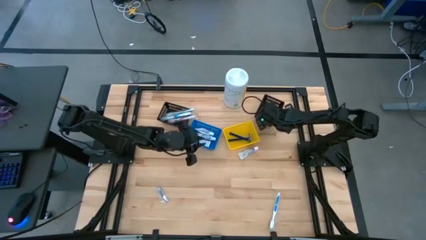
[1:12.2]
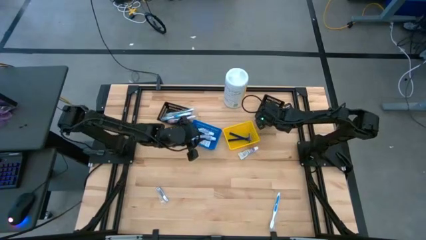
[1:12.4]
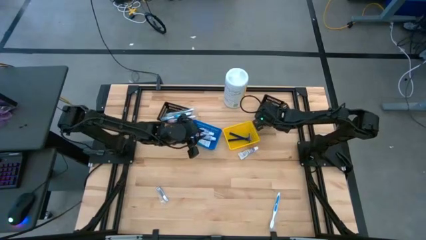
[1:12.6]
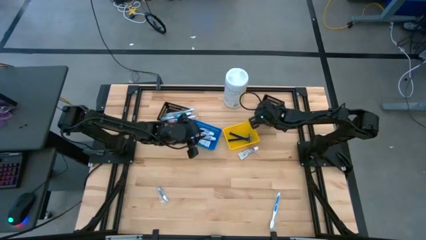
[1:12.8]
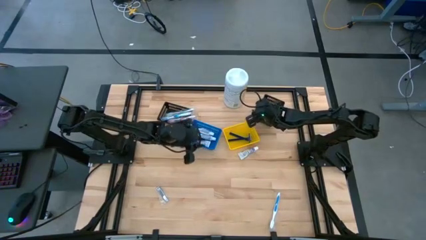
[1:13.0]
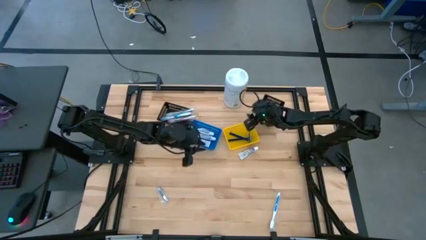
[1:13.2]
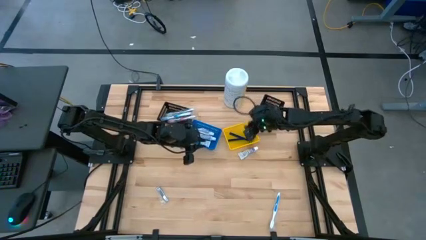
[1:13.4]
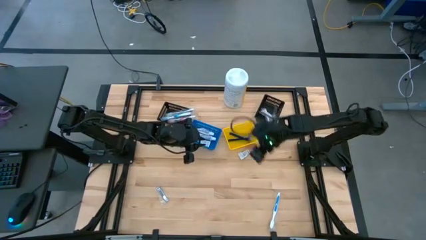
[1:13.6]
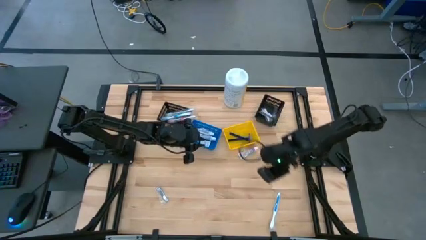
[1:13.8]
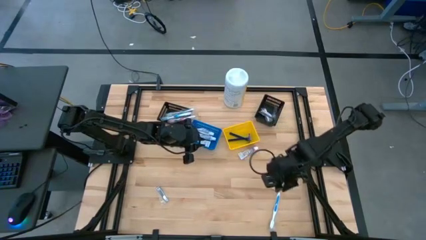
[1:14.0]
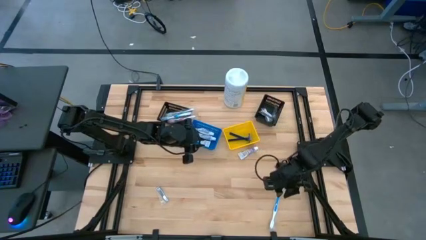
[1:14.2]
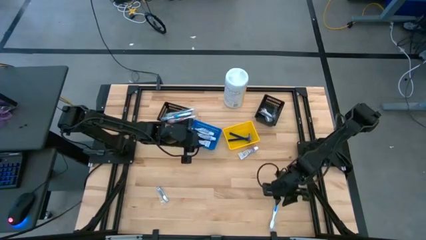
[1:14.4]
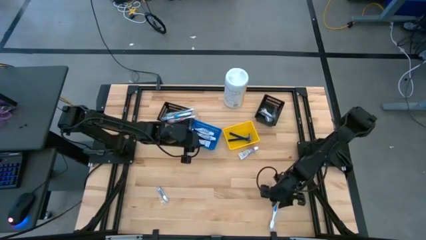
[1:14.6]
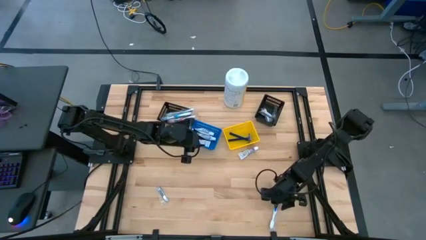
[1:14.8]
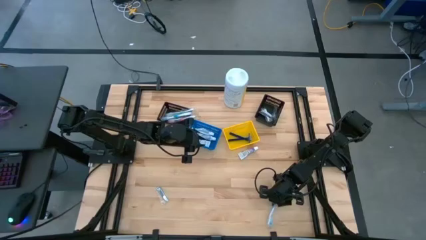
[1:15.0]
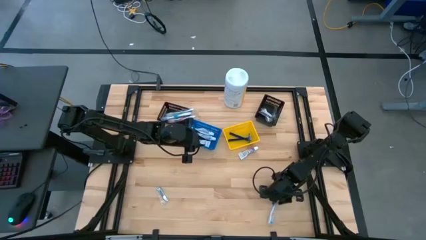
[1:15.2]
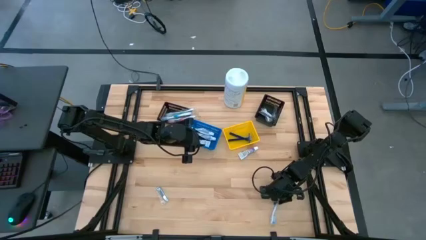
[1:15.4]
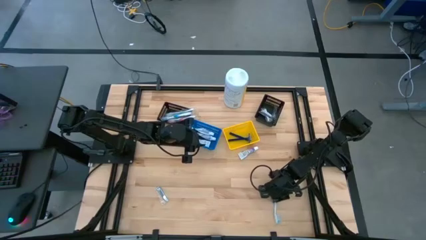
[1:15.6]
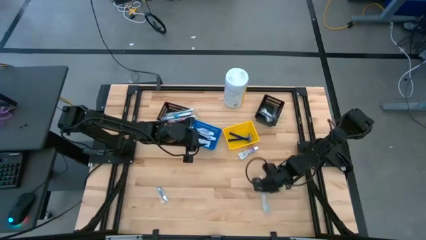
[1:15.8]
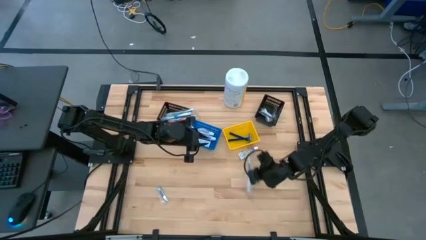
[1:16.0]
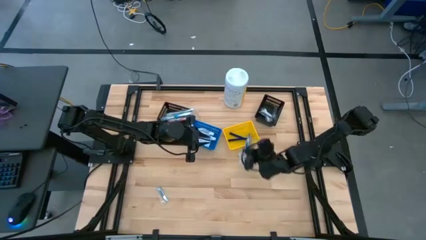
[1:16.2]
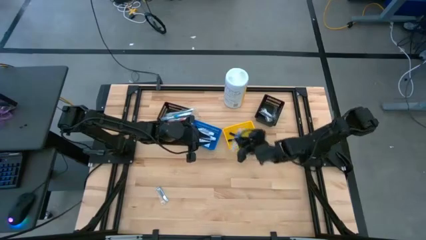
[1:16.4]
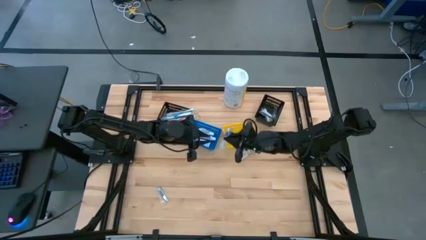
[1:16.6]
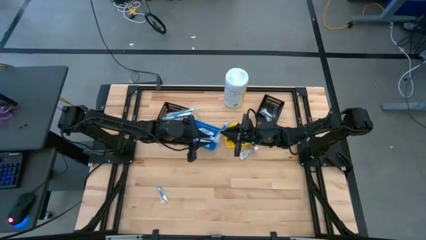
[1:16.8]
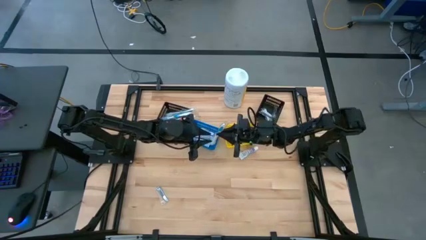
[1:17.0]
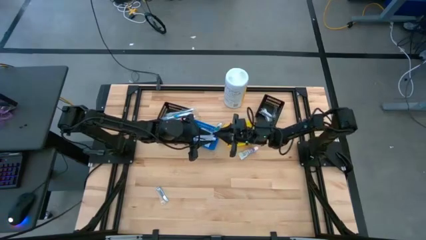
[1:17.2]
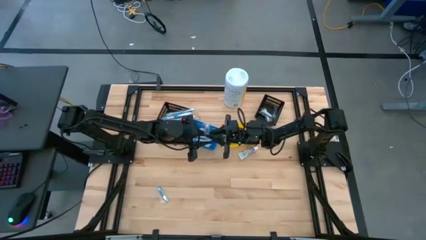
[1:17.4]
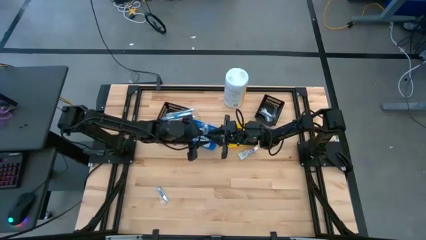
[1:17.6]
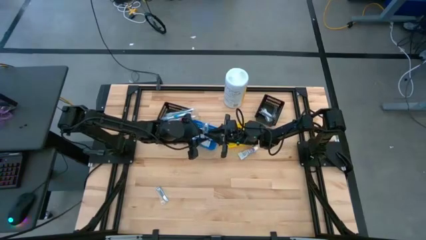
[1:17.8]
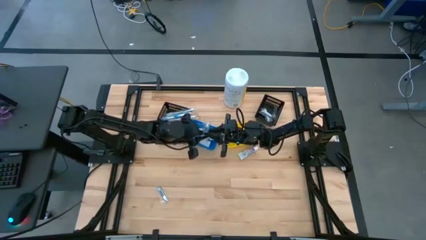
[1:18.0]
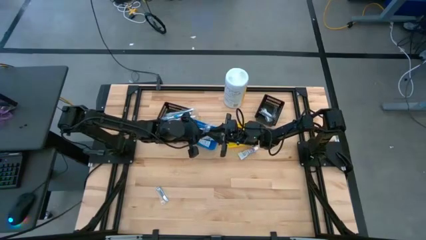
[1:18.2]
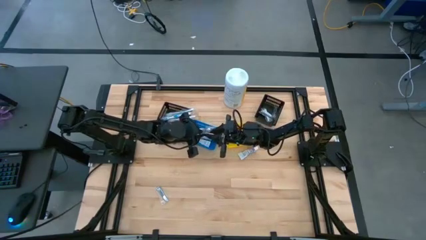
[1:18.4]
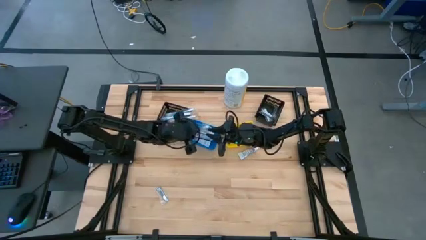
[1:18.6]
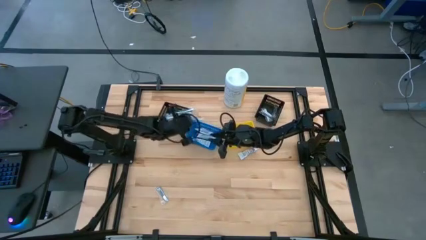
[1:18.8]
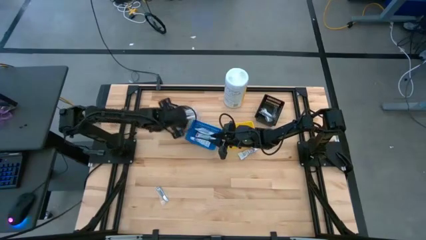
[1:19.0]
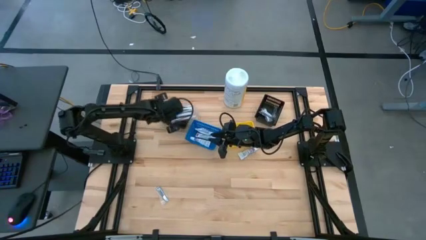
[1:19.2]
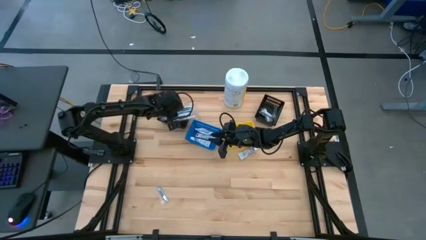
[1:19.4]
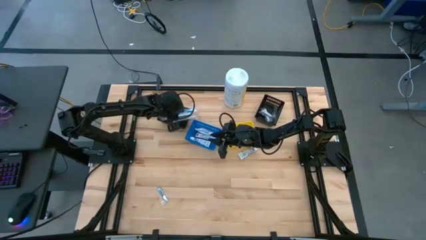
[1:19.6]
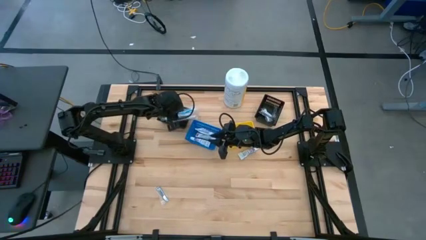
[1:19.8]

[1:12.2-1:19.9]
Task: Pick & Place Travel size toiletries
Put the blue toothbrush into the left black bin

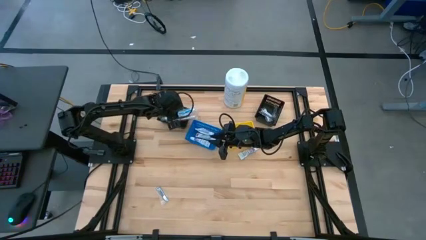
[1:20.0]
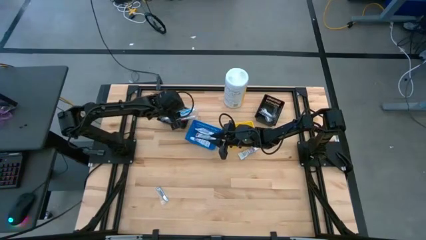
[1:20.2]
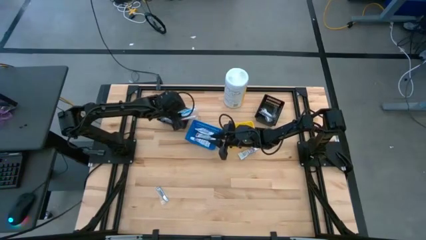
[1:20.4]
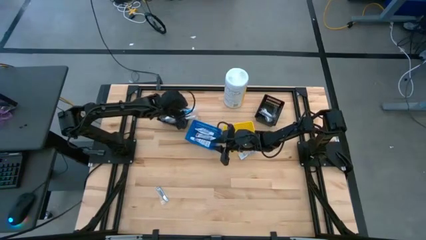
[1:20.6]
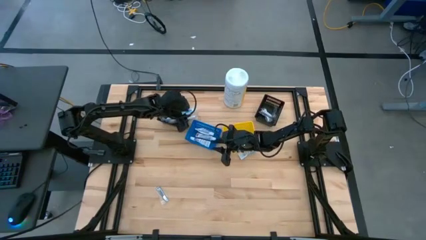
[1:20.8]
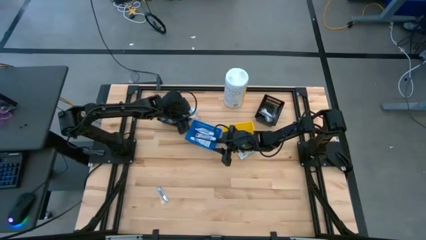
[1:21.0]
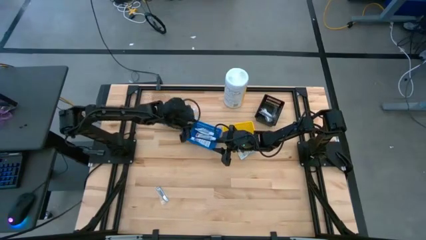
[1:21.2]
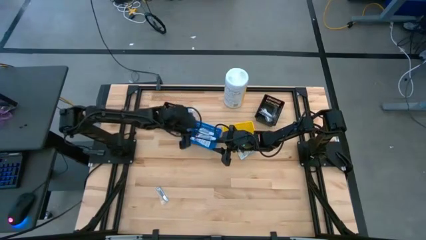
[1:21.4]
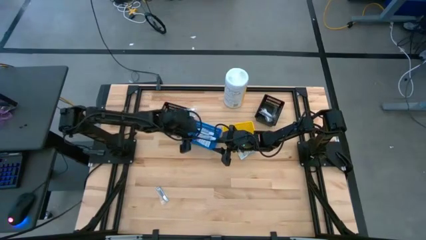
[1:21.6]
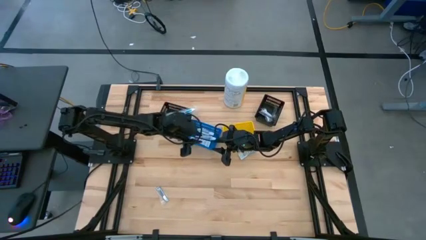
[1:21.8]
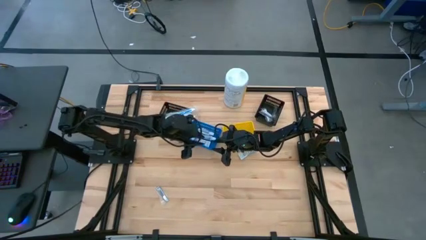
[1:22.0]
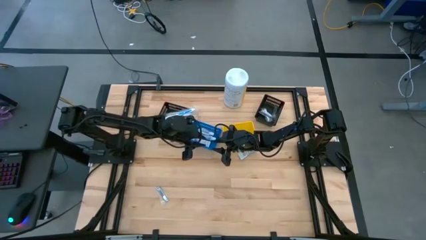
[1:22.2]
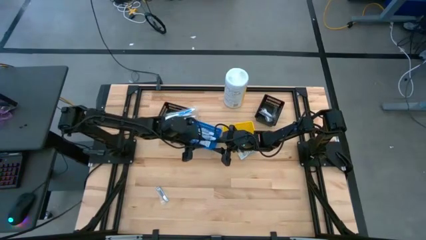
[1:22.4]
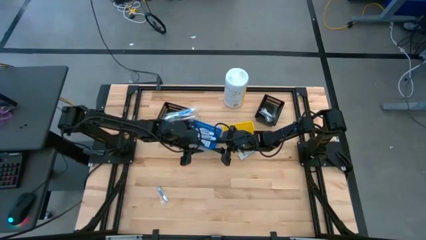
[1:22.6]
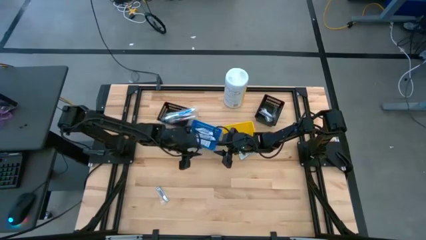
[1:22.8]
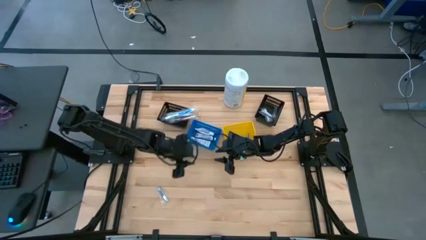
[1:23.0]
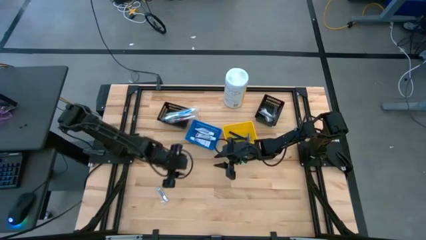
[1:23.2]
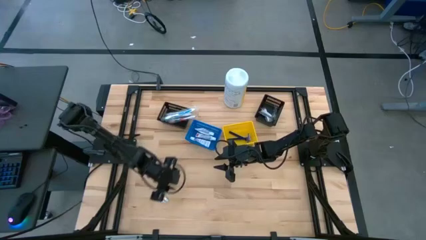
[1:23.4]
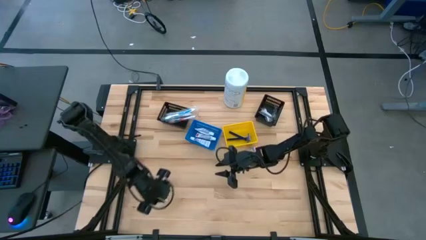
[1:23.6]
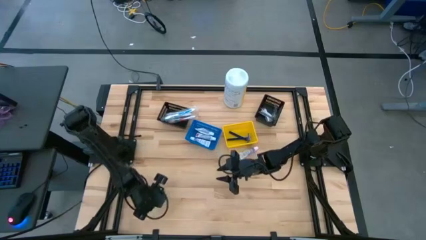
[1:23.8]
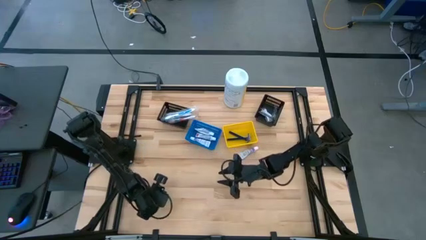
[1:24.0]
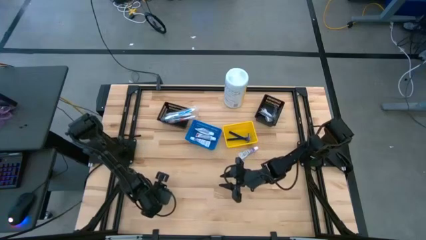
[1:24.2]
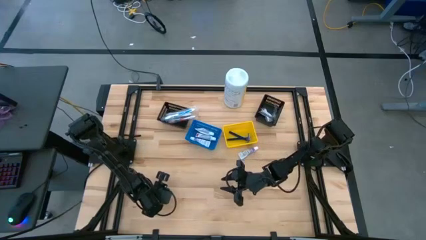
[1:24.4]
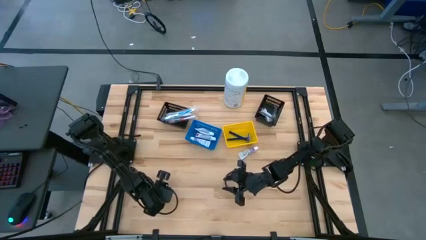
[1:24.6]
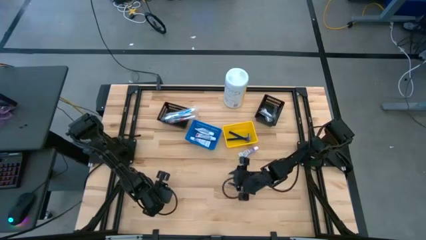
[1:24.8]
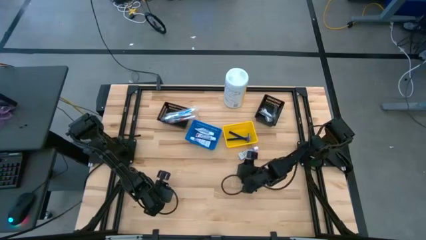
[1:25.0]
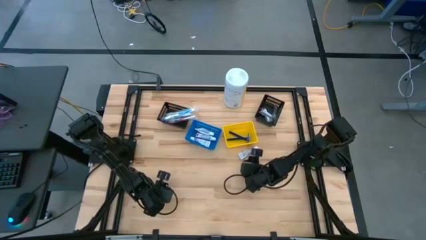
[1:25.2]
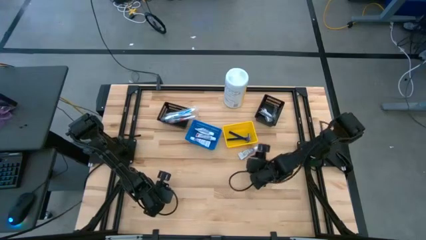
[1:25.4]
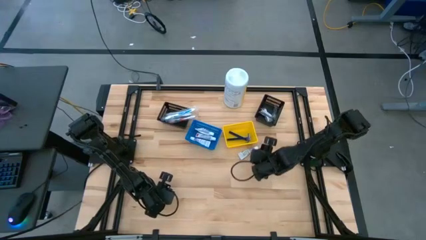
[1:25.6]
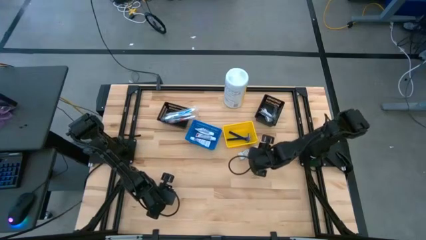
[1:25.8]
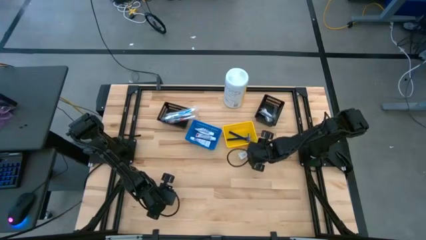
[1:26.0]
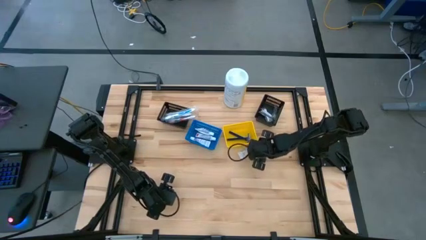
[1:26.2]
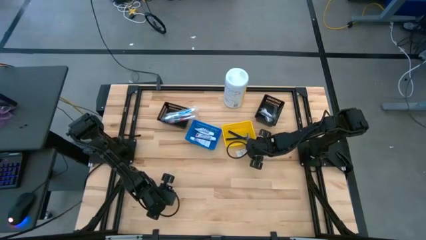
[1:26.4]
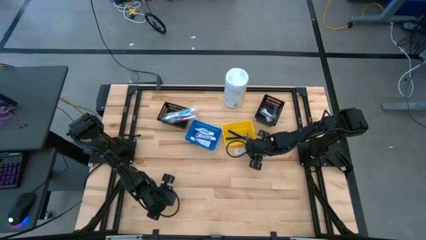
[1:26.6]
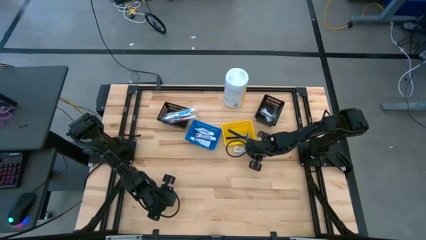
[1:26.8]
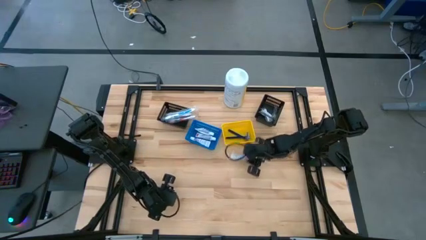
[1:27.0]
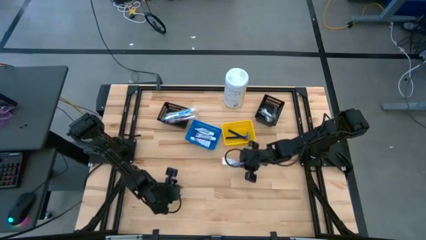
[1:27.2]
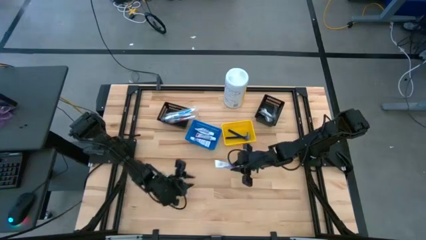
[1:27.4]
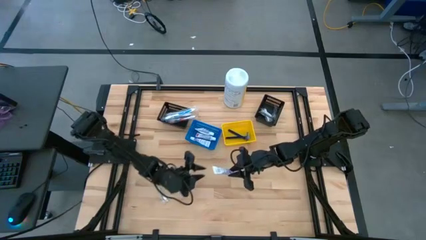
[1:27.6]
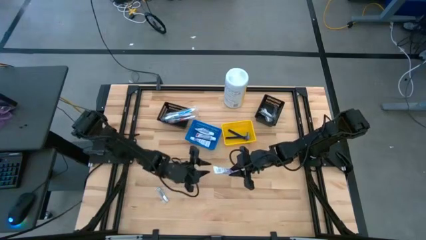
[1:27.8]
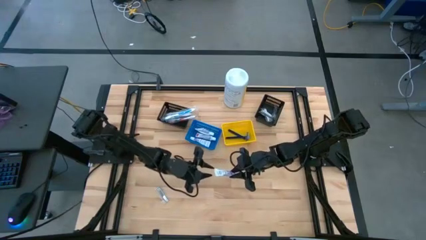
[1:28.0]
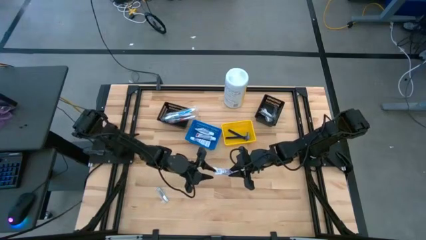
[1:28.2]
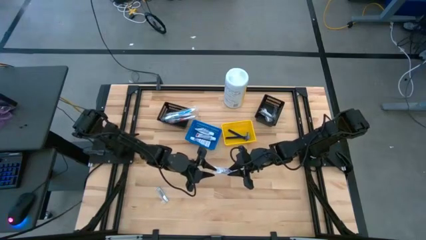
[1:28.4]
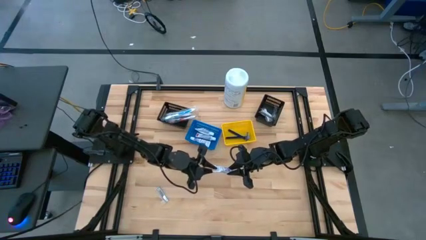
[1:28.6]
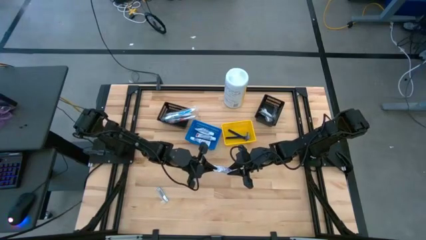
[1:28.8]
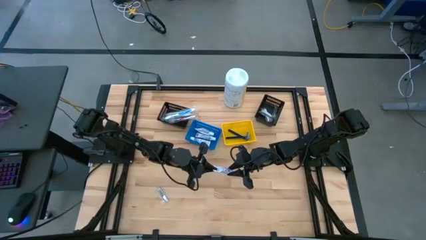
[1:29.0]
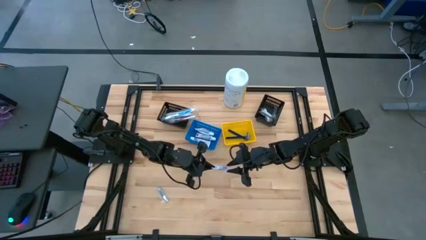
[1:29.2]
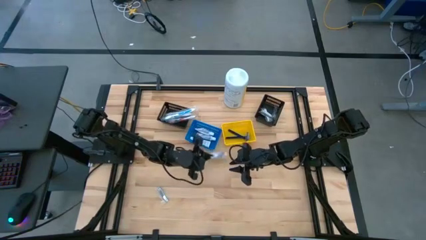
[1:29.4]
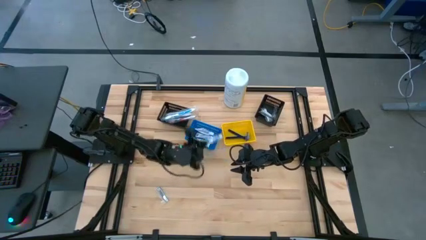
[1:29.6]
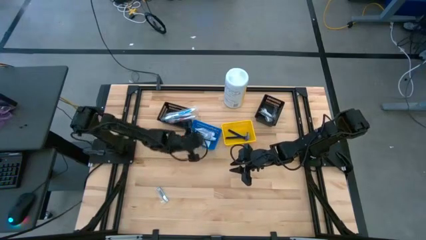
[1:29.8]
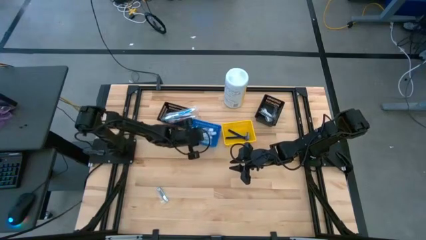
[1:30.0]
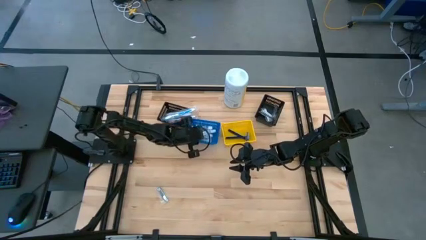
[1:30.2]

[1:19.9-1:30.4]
Put the white toothpaste into the blue bin
